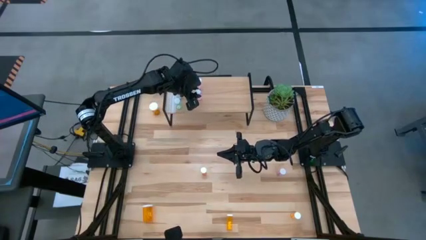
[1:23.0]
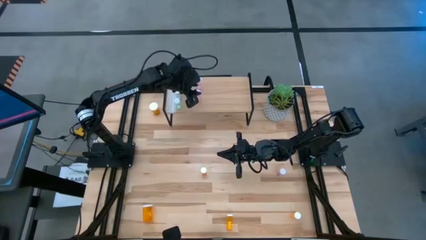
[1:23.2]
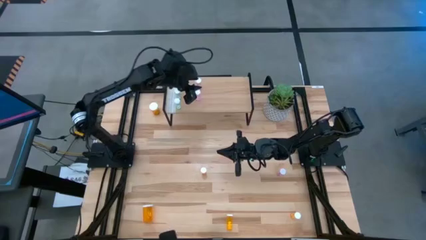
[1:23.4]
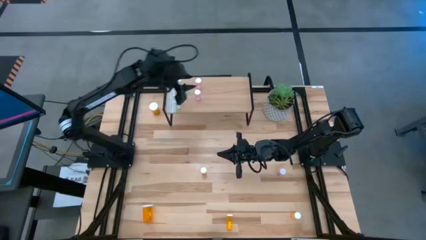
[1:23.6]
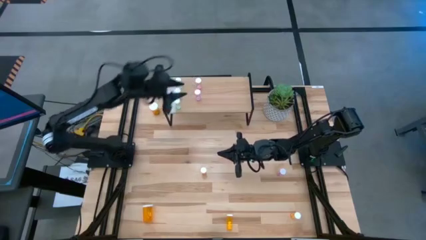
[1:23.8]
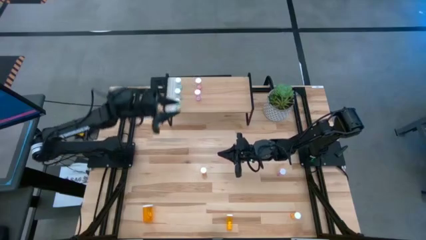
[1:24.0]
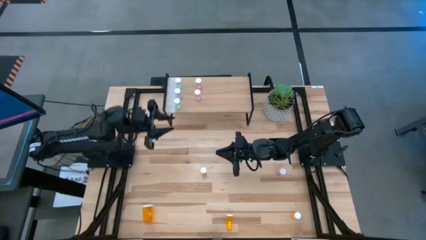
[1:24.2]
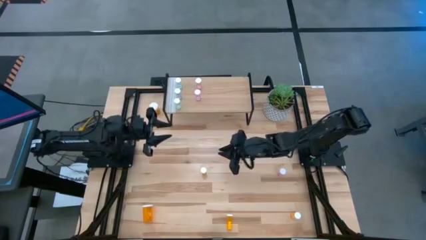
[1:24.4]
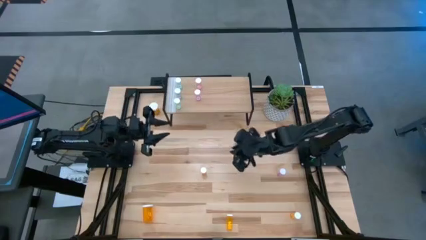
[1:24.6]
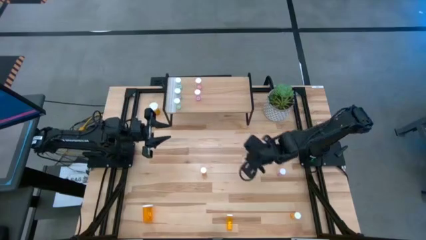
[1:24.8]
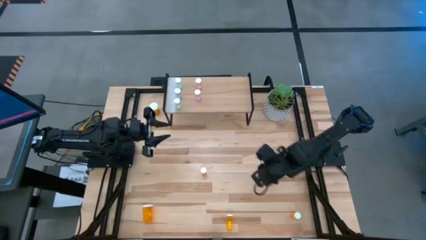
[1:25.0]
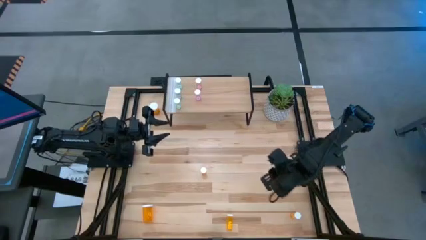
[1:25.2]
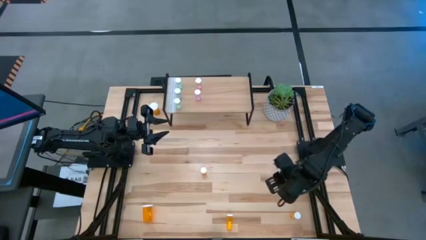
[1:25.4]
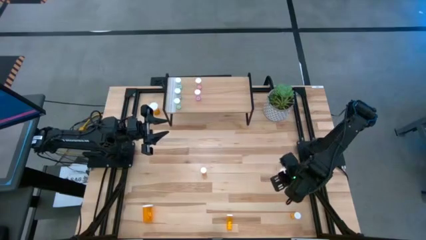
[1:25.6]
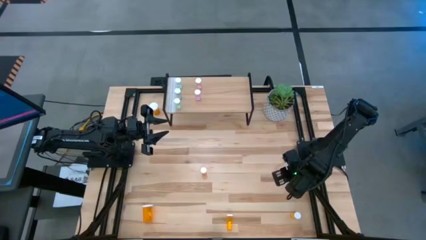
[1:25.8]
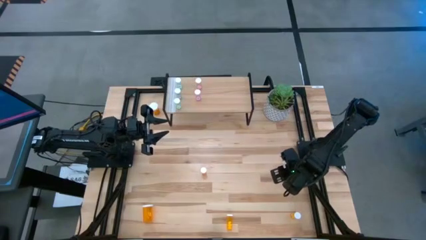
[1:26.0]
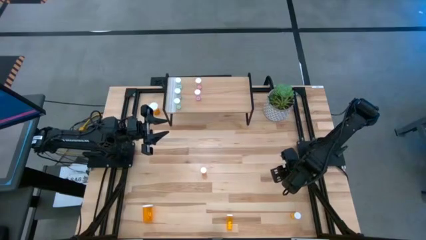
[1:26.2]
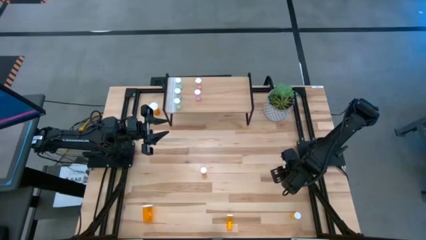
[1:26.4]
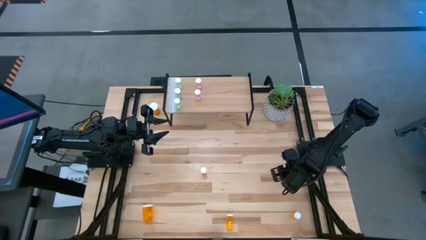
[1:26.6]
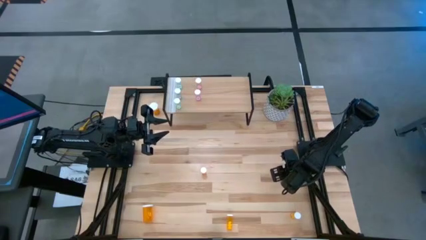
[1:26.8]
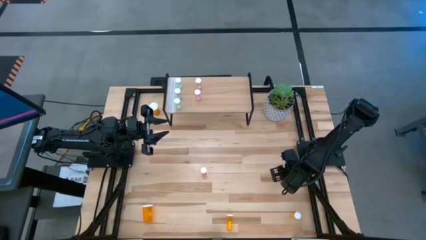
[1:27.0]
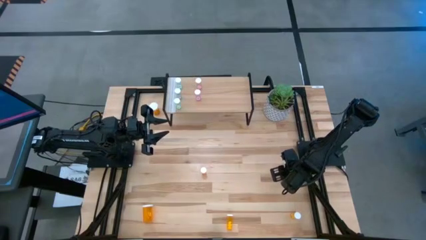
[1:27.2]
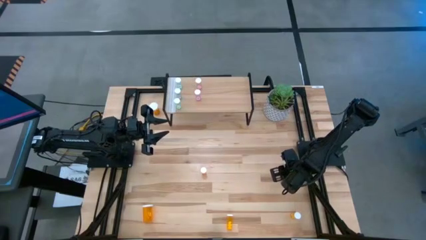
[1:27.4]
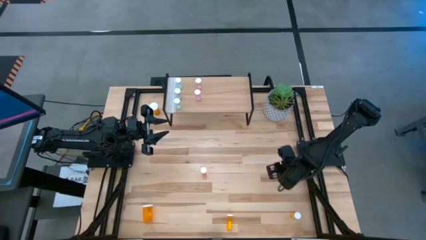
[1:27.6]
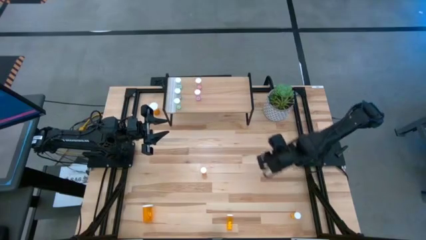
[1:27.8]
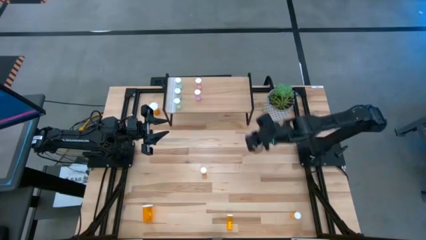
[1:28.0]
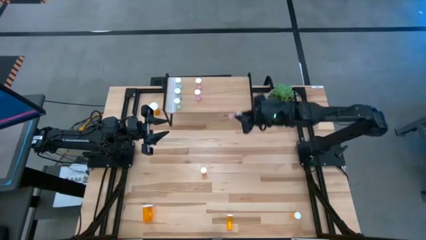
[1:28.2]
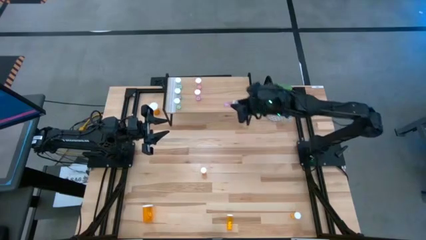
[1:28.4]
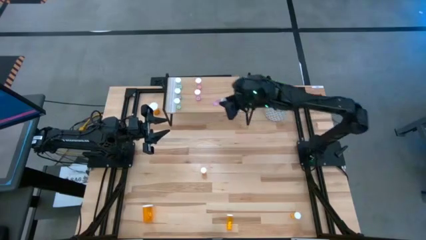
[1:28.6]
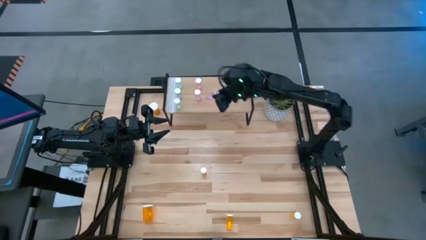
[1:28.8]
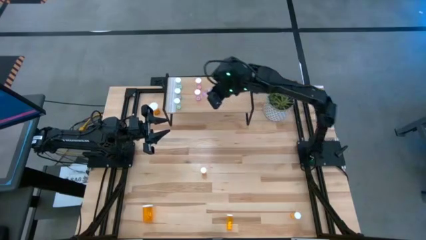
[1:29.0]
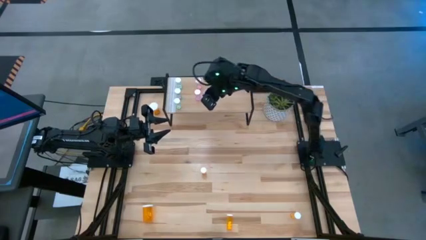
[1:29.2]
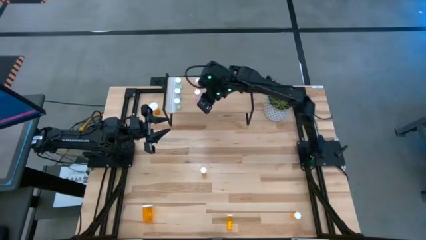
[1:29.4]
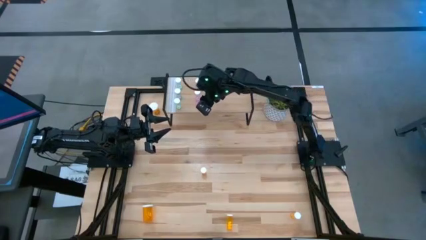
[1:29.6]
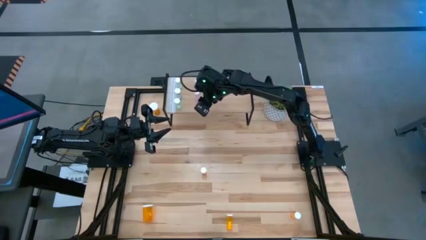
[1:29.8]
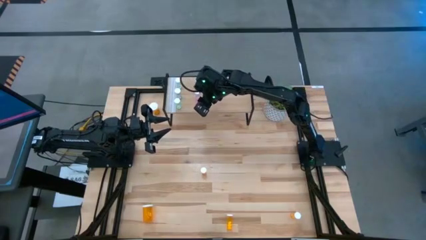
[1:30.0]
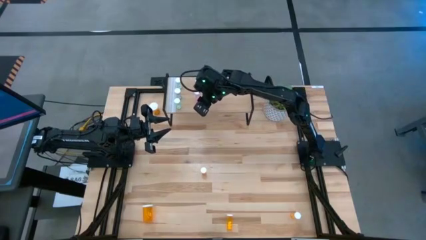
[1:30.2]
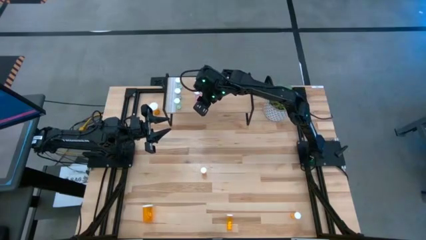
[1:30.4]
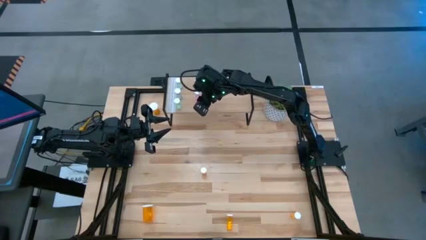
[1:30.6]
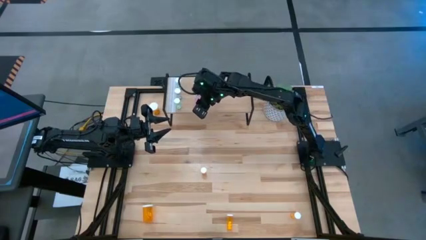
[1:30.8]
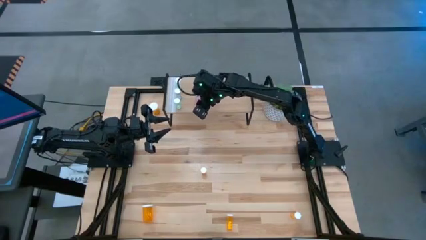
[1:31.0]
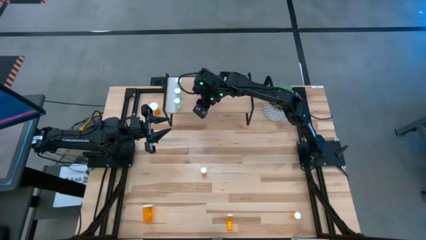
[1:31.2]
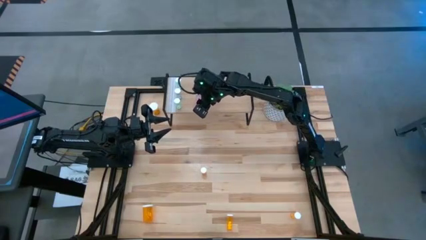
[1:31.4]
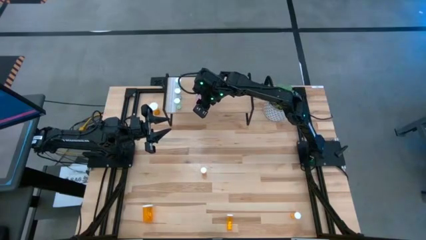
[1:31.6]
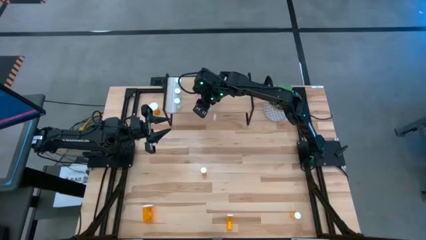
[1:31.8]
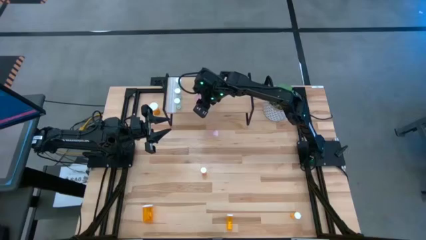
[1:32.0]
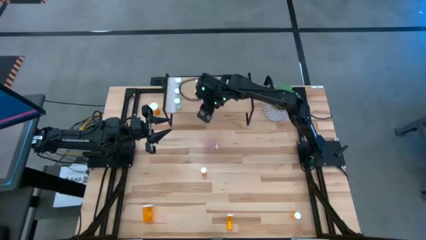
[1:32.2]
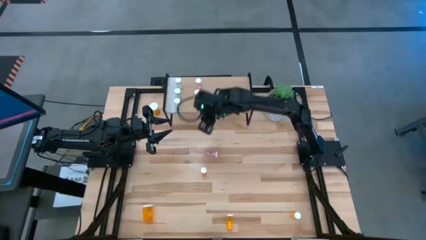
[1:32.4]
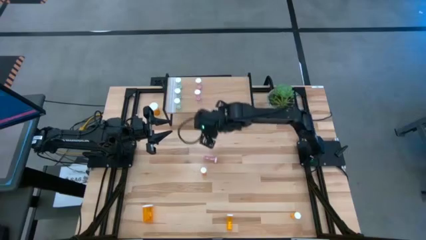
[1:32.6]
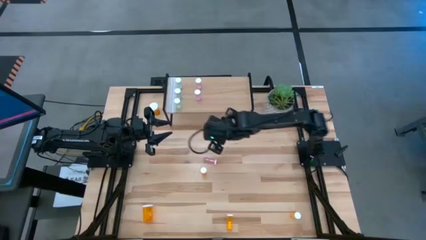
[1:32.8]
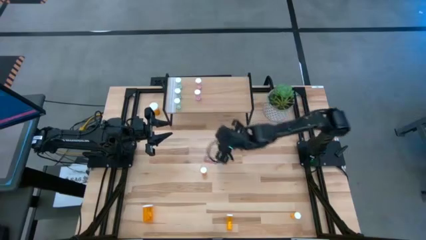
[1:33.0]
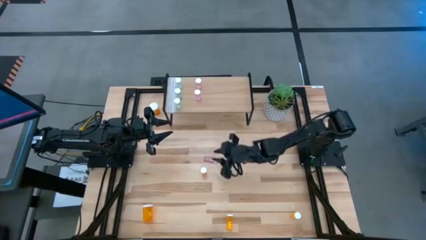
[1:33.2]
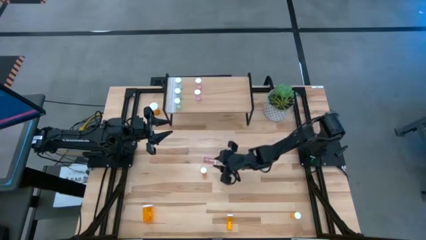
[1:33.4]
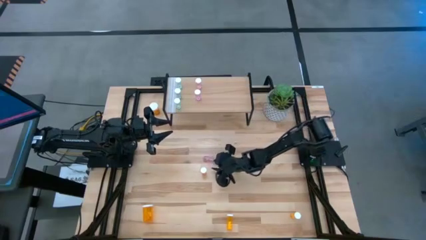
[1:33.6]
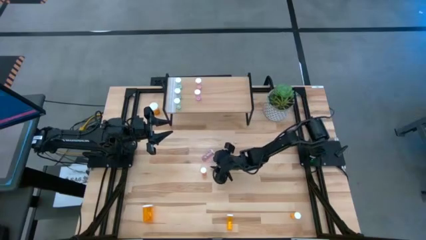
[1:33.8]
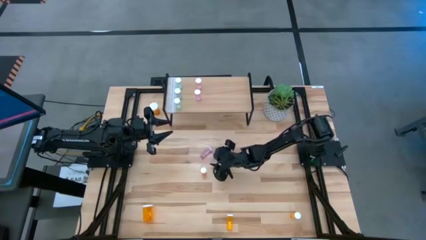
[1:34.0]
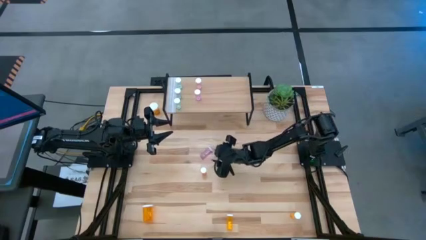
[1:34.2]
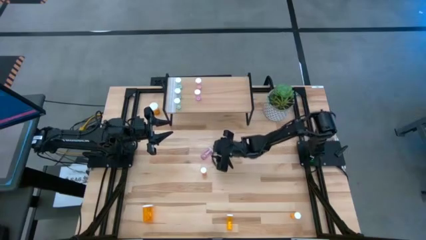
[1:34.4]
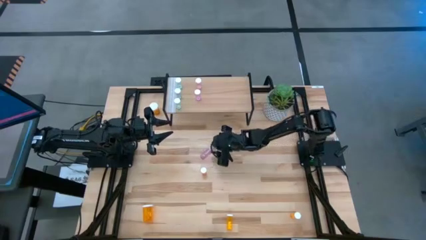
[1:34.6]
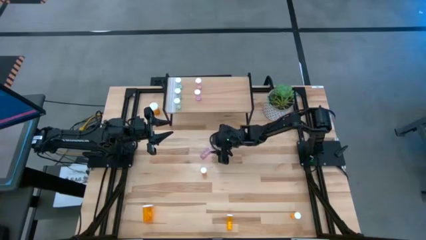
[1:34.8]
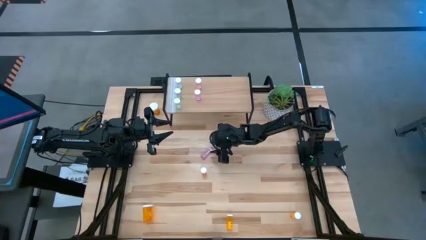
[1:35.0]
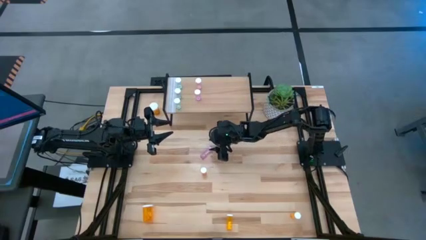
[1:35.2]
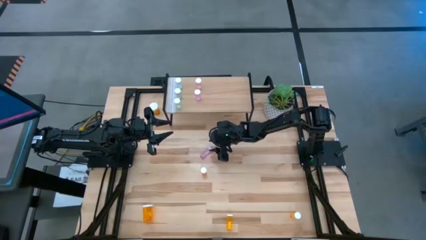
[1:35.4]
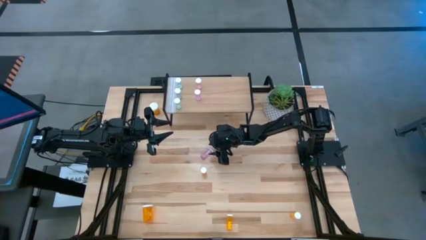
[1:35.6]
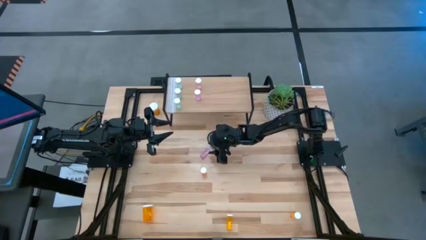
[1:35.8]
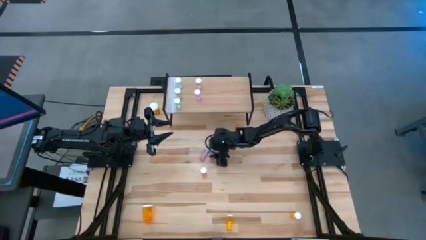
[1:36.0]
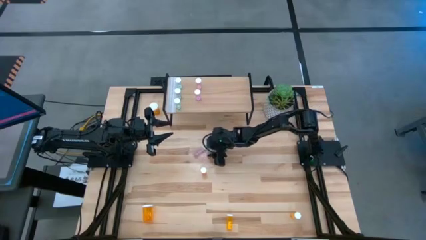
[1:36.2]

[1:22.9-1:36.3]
Task: Pick and place medicine bottles onto shelf by color
Put the pink pill bottle on the shelf aligned with the other pink pill bottles
